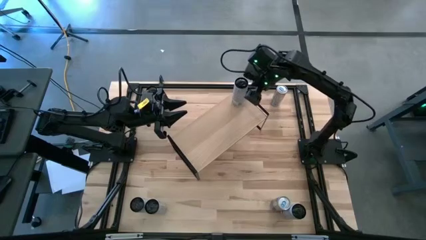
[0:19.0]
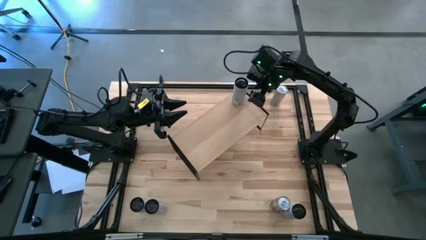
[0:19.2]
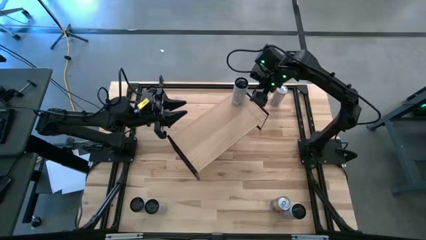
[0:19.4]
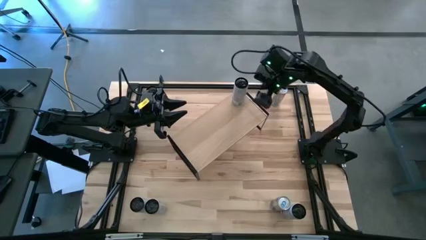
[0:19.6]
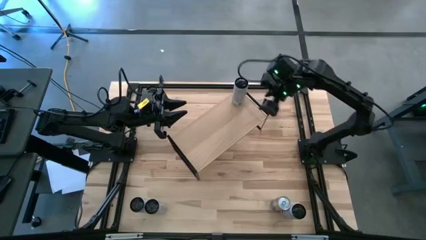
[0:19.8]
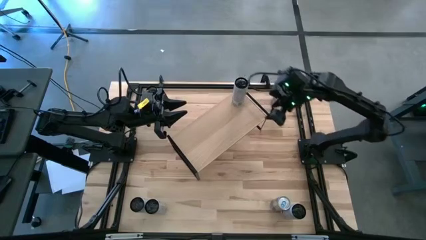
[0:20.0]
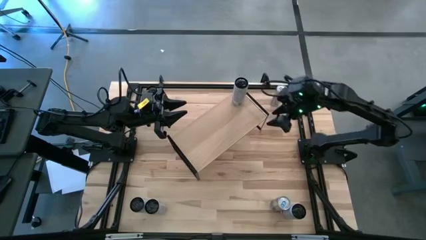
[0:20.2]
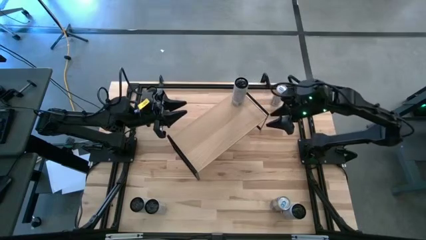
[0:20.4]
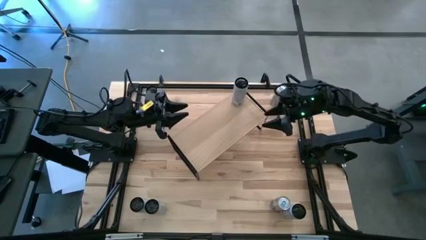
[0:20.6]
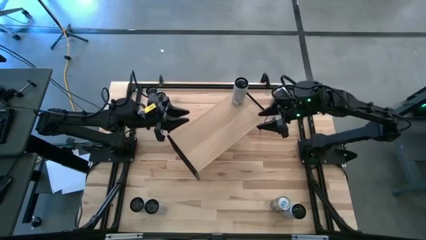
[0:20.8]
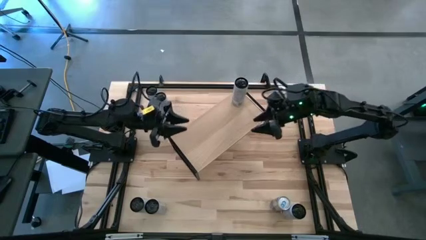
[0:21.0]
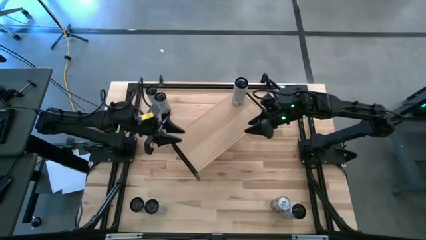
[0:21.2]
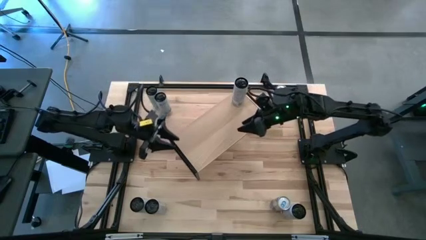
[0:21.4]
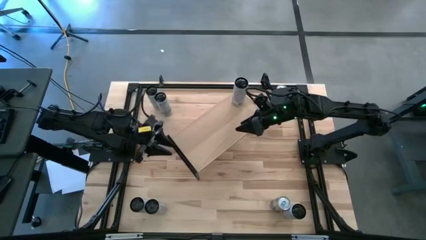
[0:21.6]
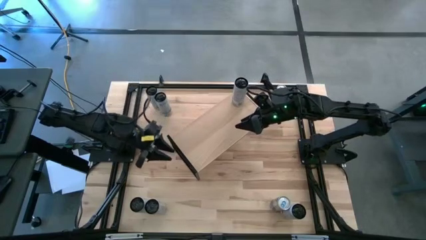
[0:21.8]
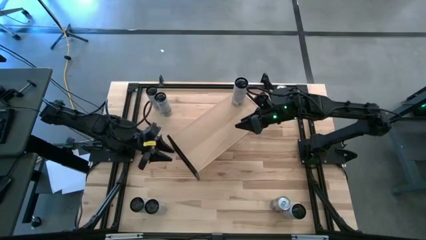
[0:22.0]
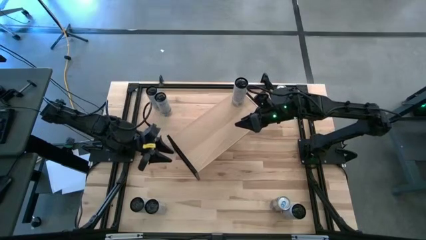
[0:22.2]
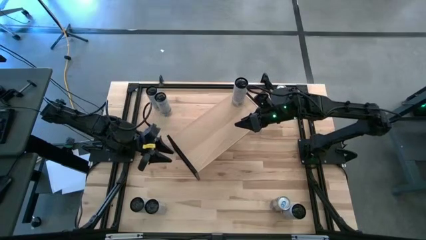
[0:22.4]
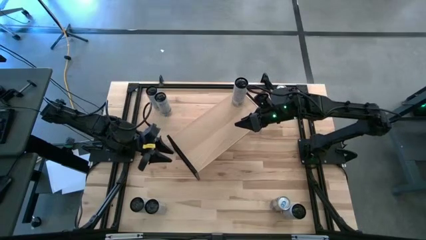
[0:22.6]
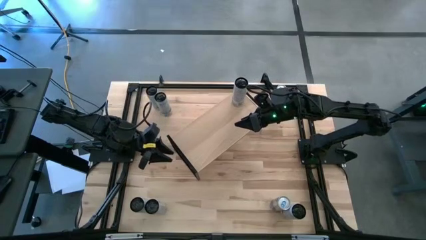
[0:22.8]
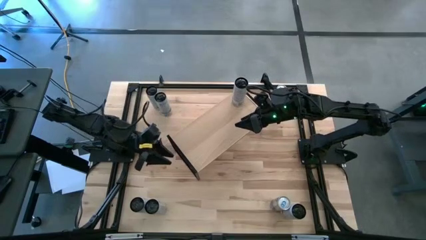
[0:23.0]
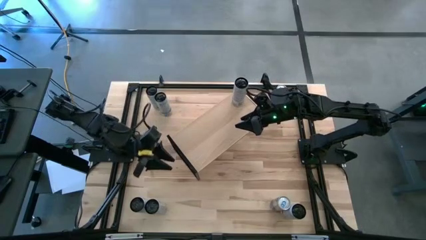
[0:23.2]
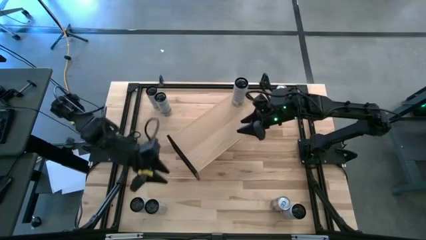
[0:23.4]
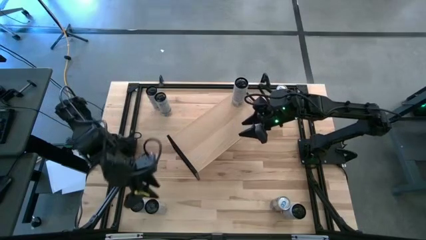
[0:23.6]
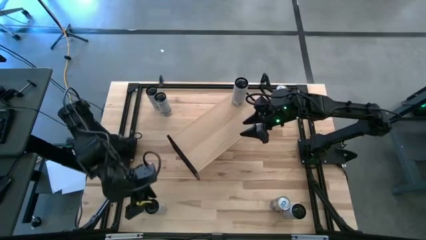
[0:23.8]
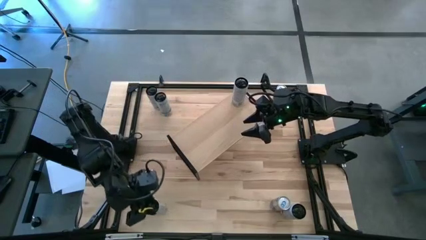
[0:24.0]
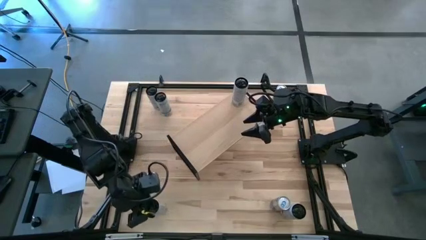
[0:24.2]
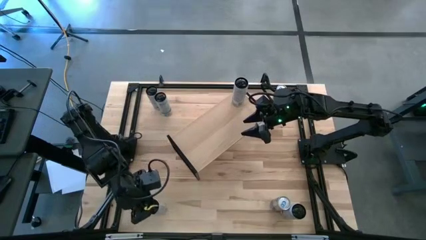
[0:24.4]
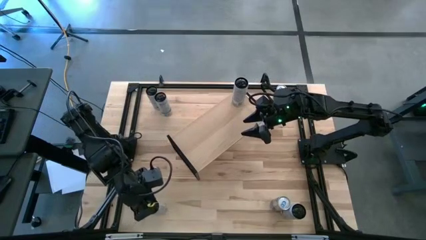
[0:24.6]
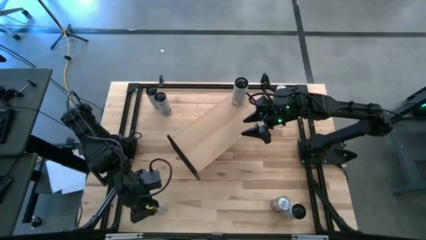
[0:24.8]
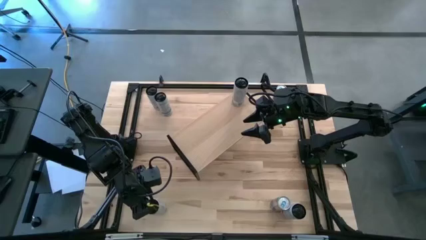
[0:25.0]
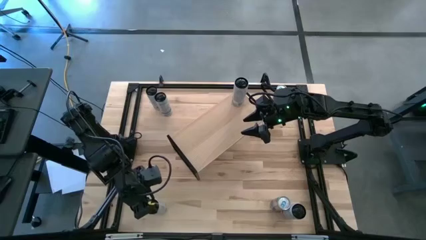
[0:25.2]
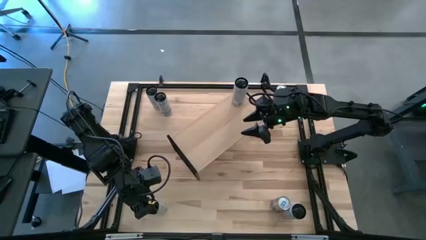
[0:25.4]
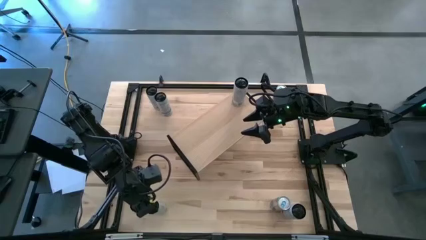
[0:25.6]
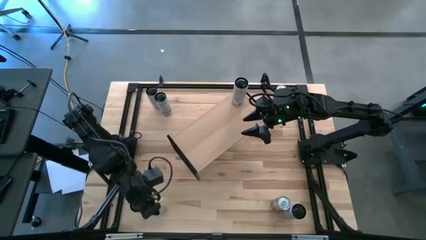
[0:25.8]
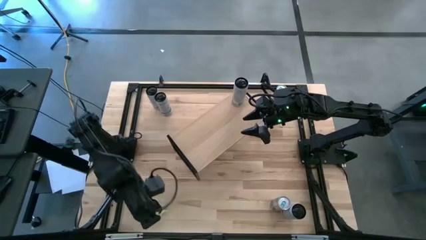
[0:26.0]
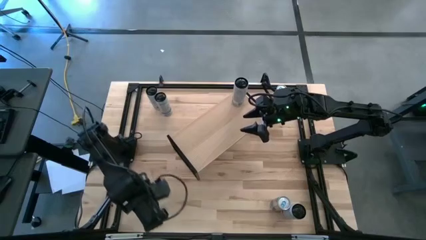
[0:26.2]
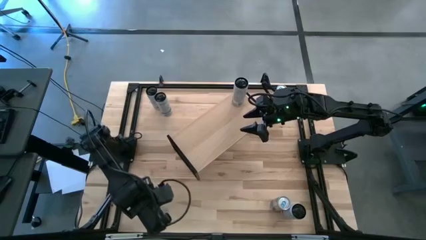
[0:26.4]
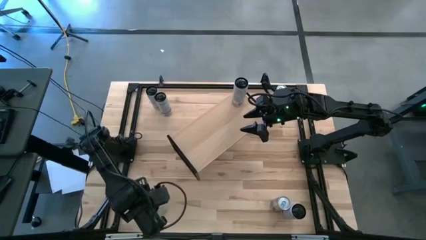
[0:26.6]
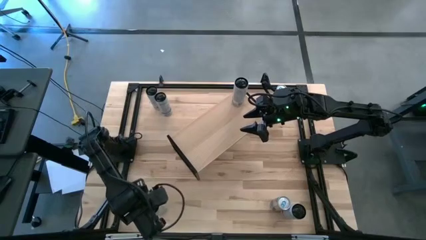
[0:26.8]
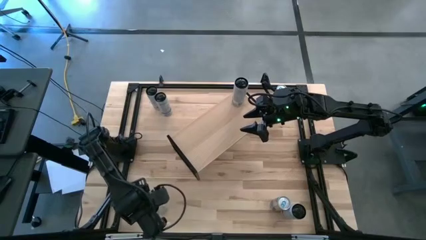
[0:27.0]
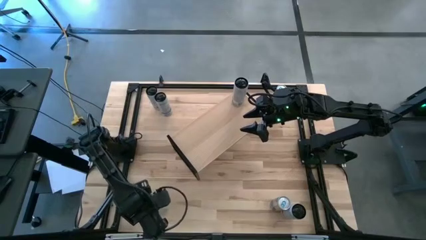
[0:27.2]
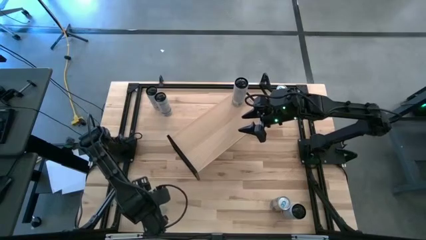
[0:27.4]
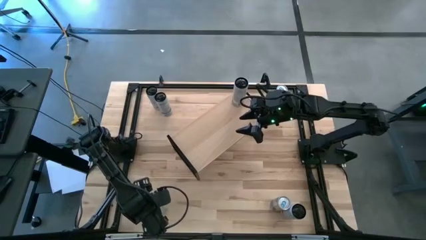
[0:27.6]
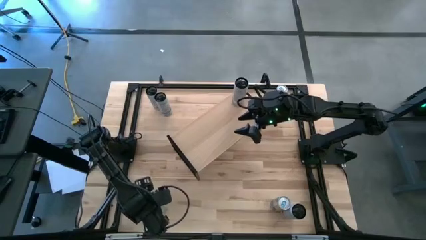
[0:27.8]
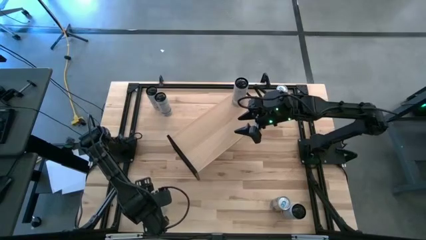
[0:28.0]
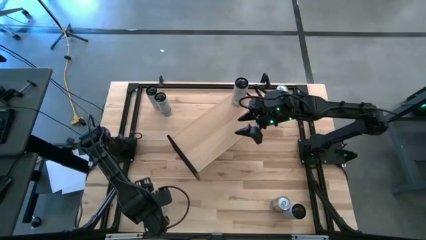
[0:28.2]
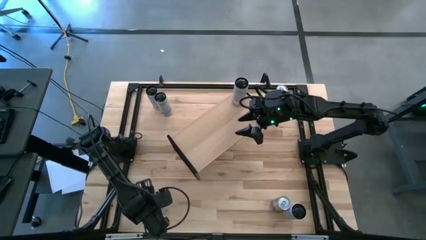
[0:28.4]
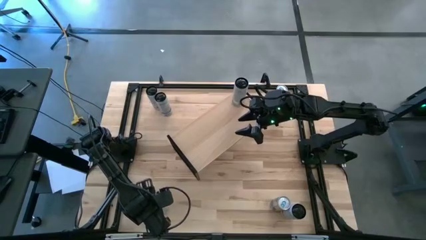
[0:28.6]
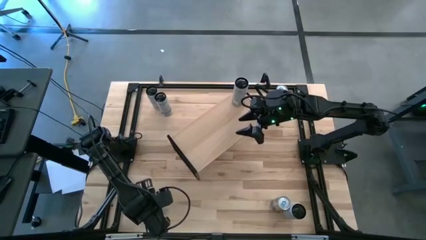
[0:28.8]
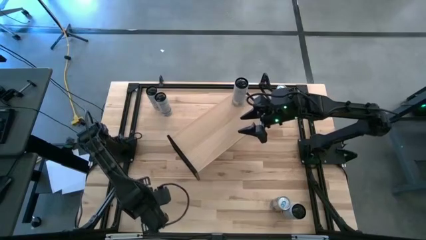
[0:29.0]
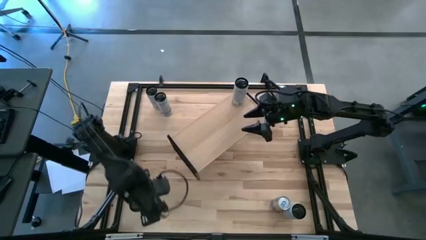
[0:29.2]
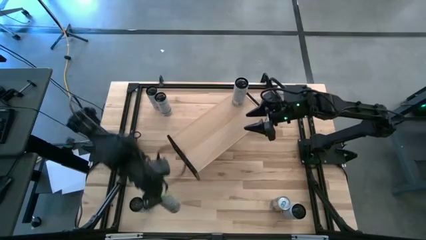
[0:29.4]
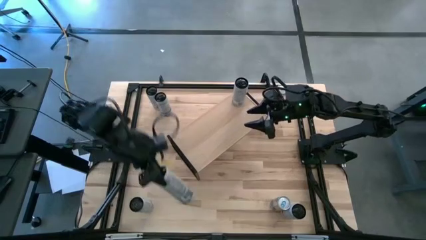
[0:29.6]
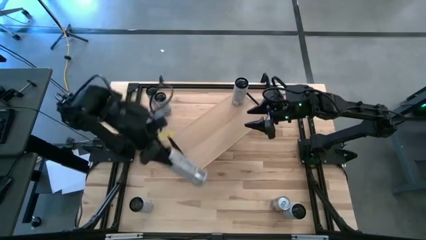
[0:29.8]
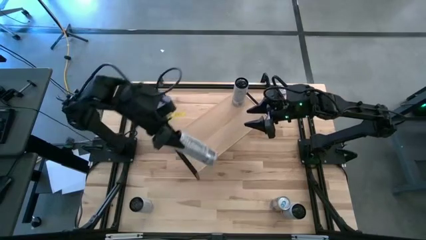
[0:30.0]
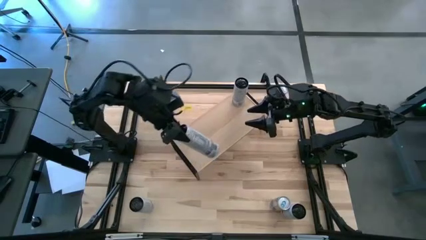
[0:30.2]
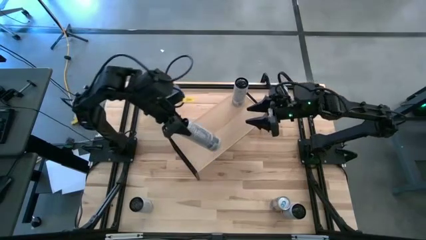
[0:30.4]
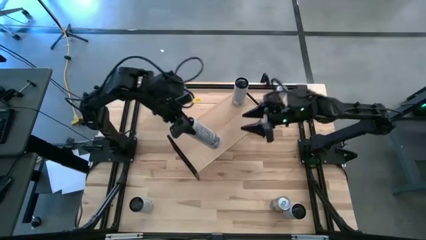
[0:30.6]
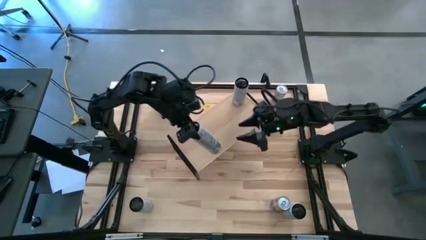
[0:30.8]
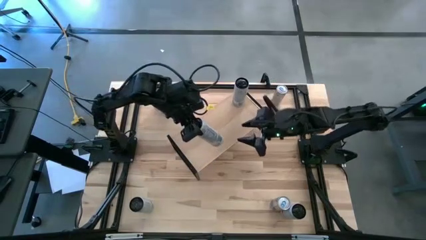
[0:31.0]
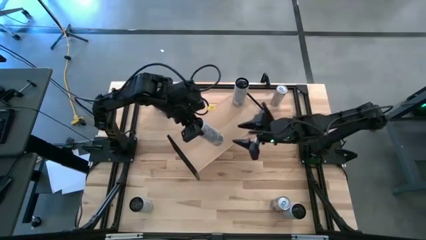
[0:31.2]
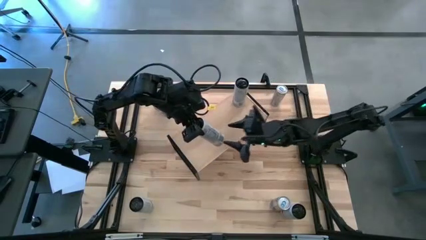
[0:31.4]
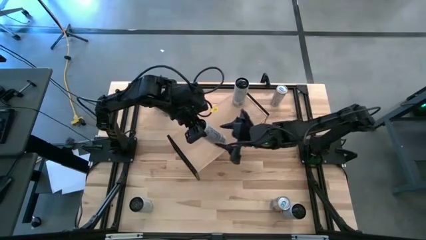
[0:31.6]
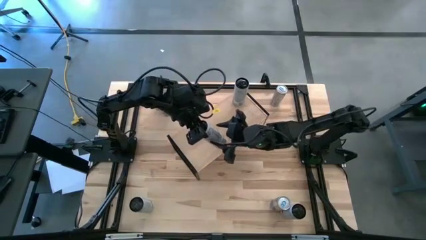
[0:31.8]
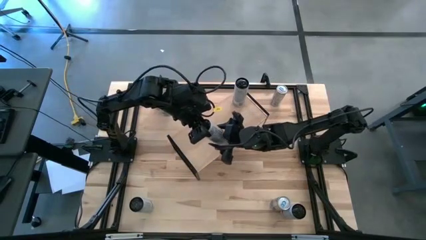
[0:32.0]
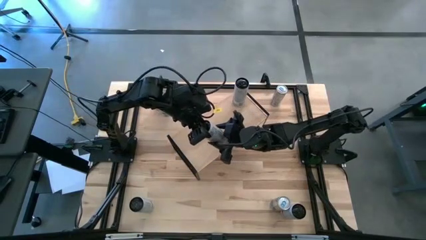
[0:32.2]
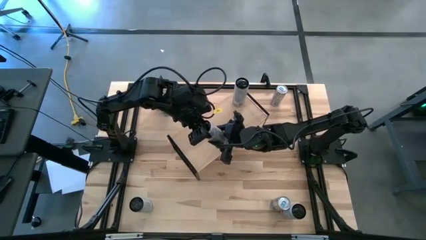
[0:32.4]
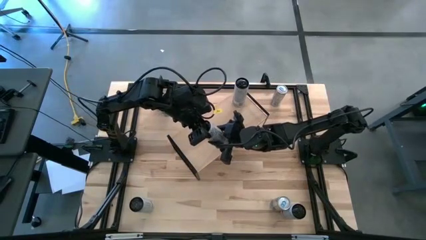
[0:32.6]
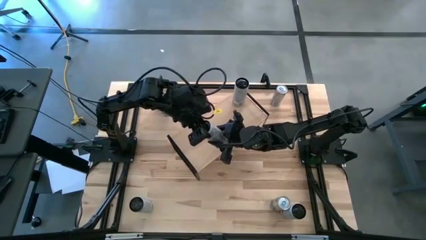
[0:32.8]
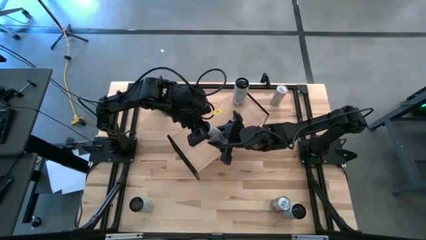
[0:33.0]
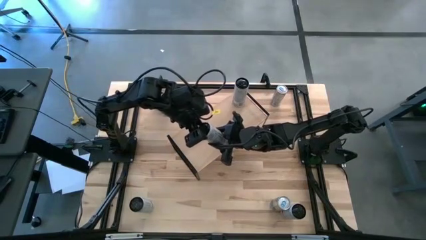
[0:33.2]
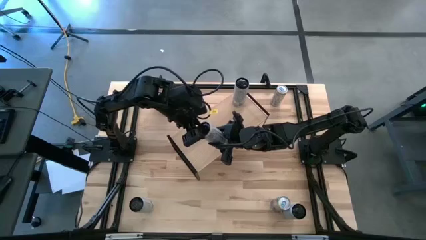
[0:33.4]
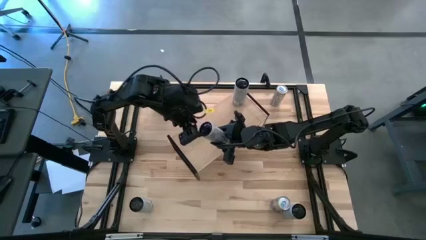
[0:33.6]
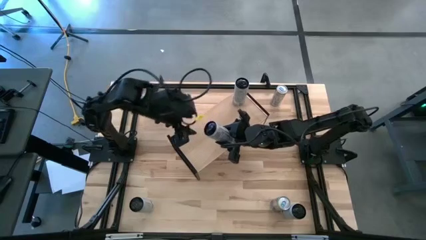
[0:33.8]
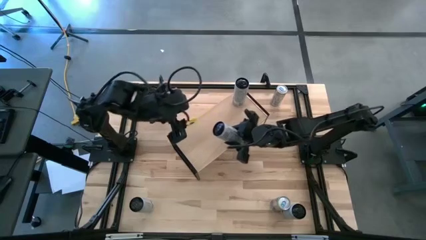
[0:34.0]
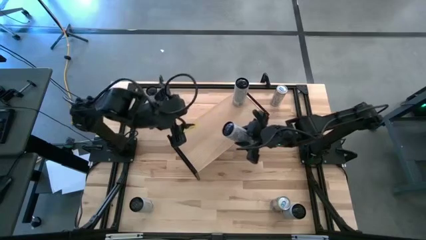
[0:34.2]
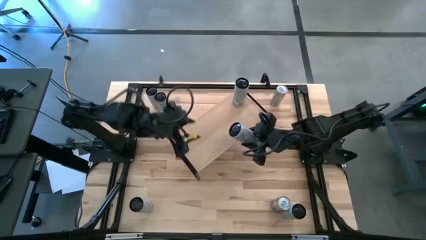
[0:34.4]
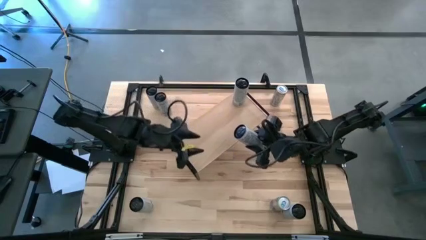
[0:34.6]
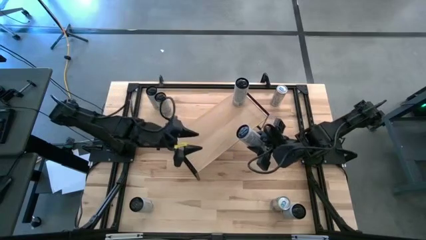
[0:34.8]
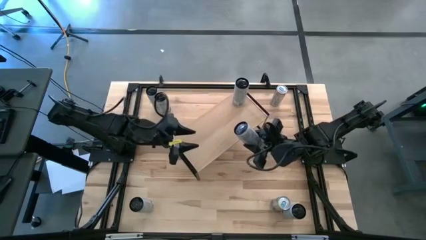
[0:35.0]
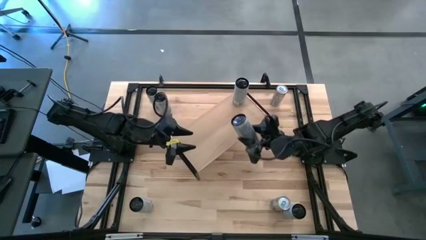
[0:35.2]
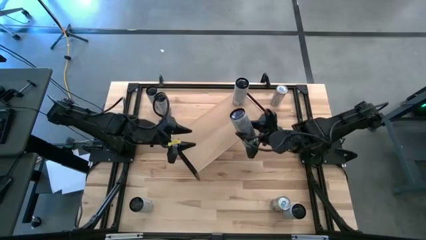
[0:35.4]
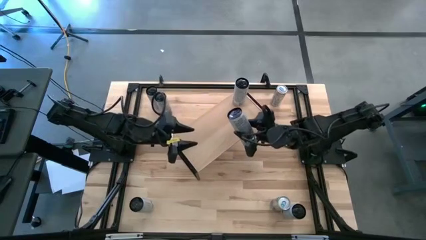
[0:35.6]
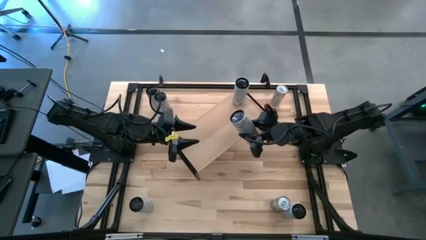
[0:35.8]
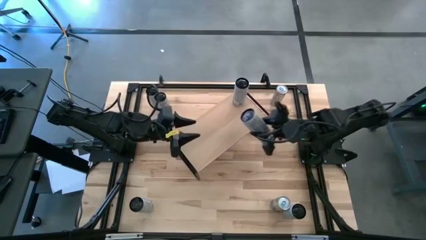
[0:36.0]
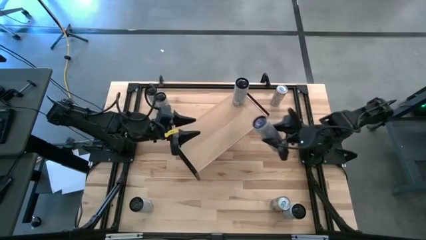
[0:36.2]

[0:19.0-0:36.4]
Task: Place canned beverage on shelf
Put the white-yellow soda can on the shelf and align it with the other white-yellow soda can
